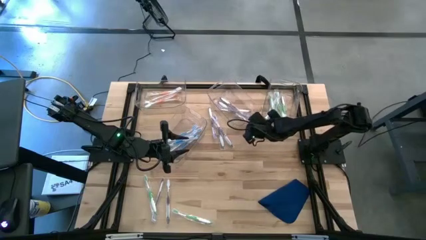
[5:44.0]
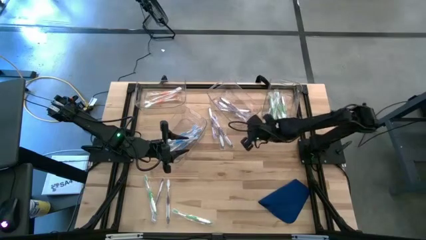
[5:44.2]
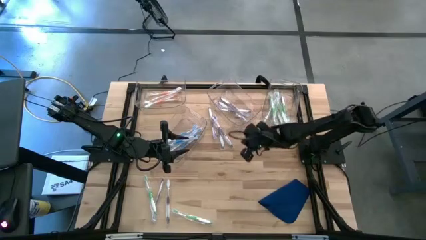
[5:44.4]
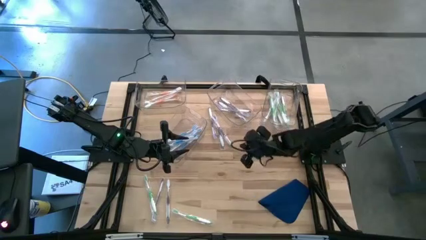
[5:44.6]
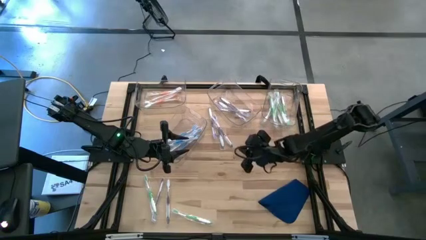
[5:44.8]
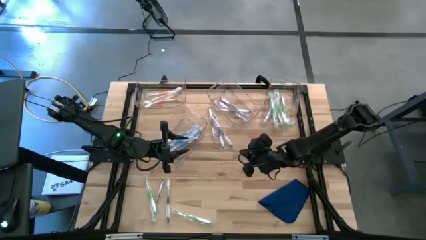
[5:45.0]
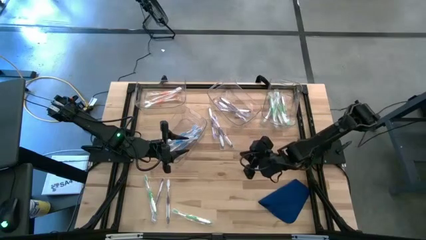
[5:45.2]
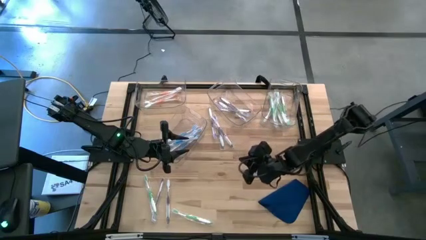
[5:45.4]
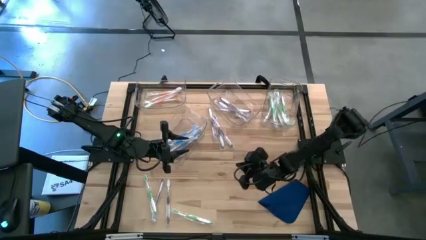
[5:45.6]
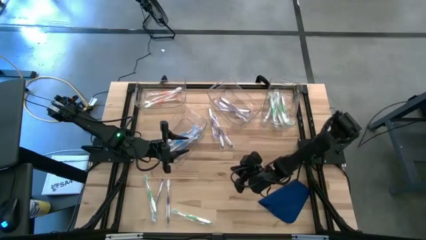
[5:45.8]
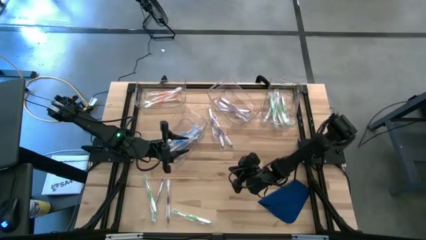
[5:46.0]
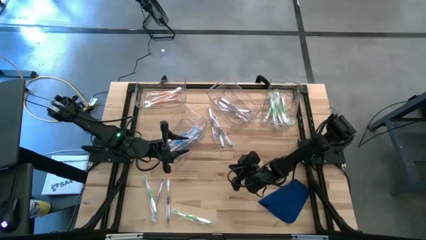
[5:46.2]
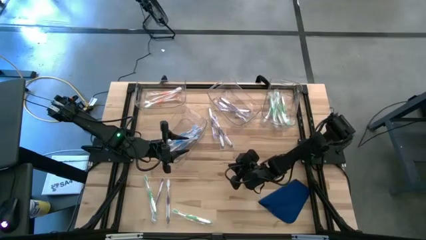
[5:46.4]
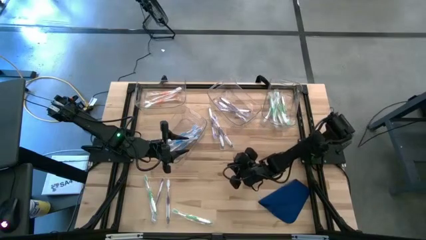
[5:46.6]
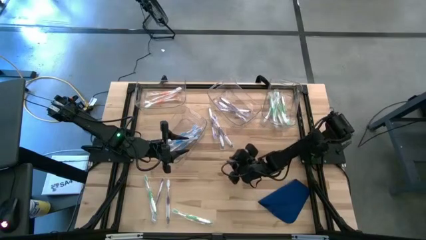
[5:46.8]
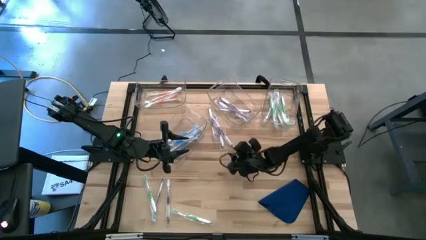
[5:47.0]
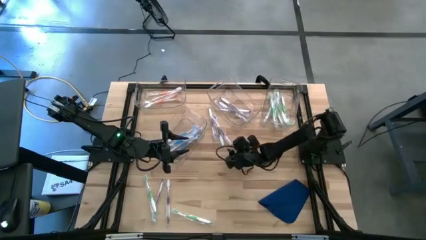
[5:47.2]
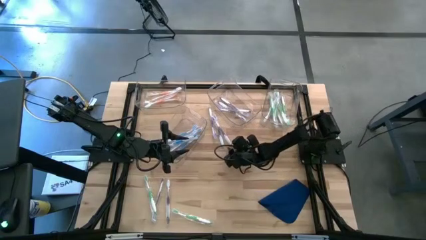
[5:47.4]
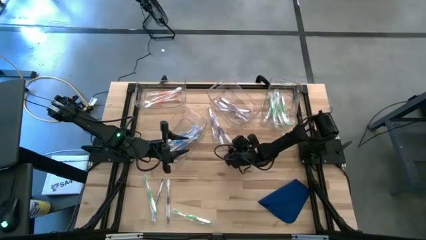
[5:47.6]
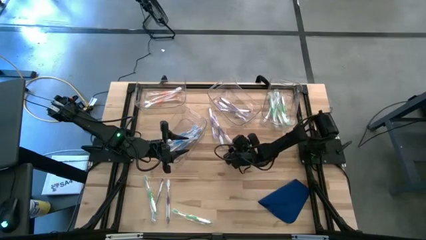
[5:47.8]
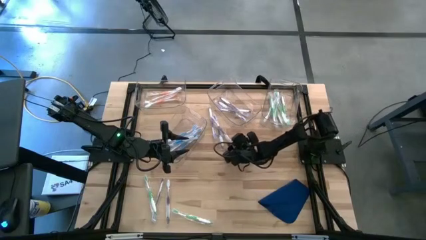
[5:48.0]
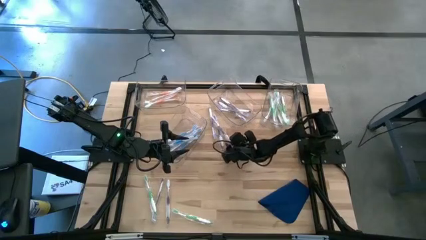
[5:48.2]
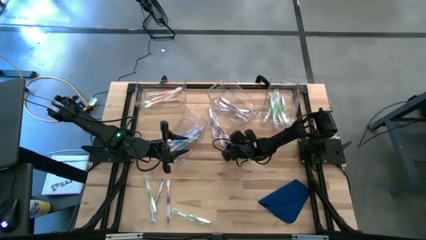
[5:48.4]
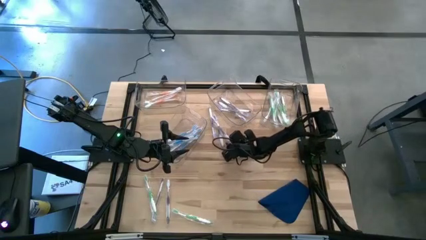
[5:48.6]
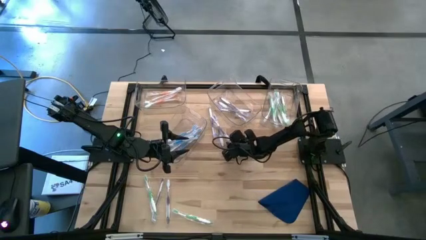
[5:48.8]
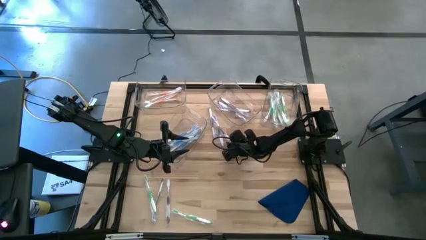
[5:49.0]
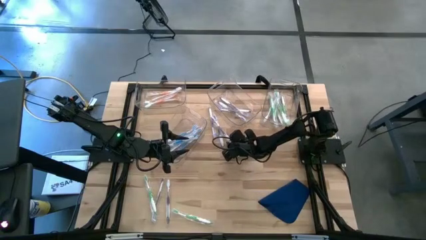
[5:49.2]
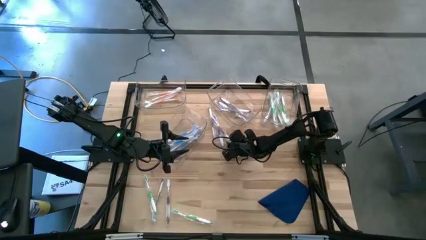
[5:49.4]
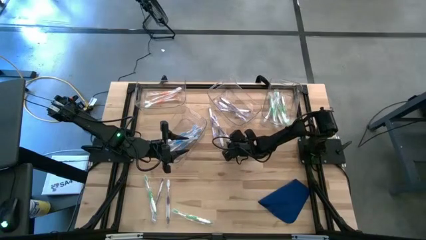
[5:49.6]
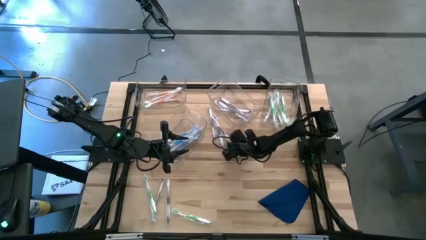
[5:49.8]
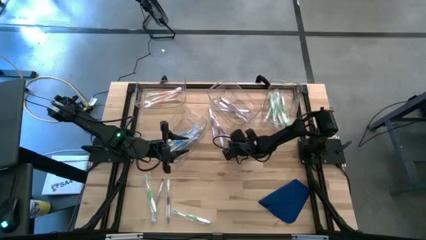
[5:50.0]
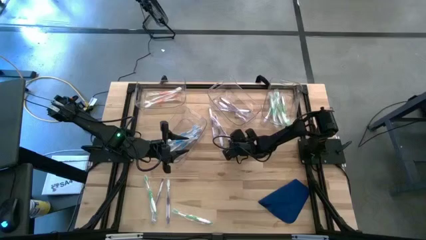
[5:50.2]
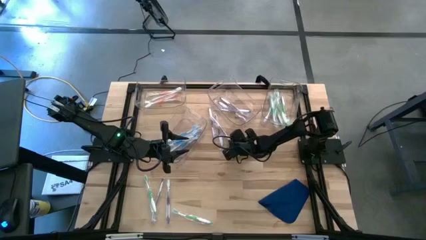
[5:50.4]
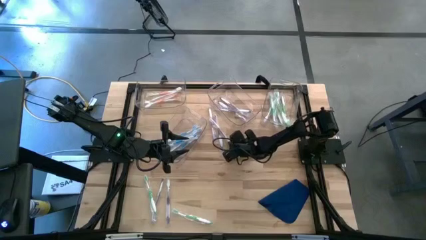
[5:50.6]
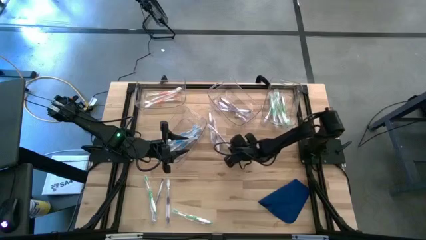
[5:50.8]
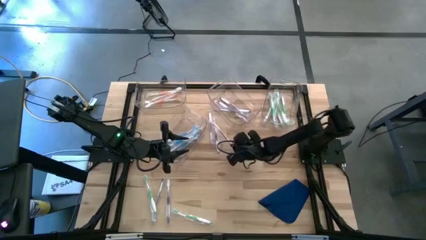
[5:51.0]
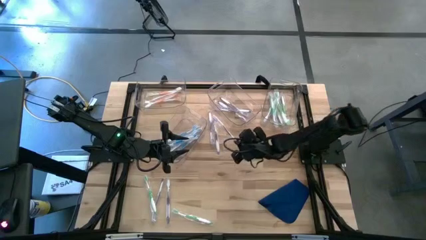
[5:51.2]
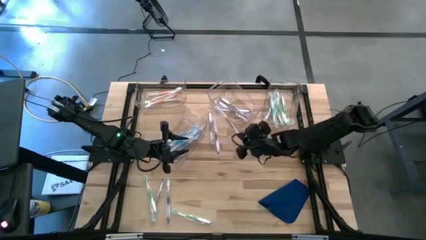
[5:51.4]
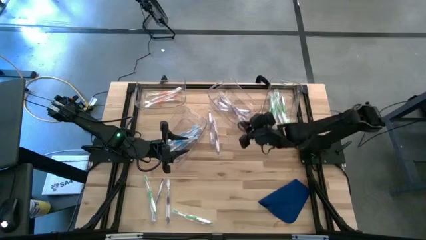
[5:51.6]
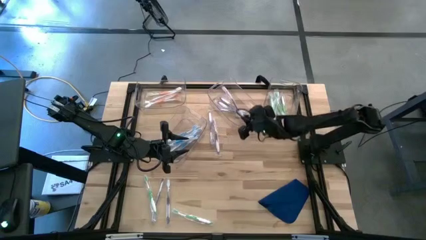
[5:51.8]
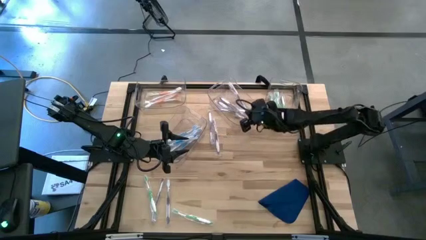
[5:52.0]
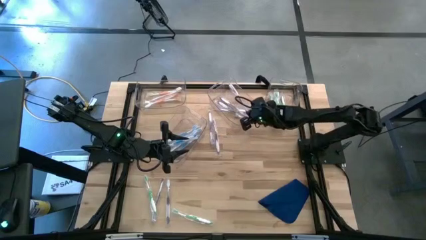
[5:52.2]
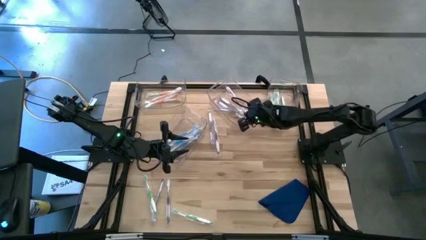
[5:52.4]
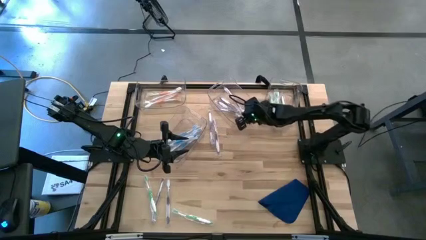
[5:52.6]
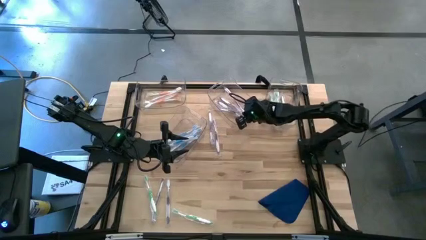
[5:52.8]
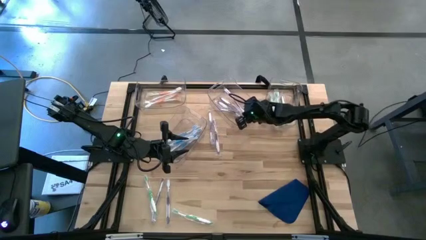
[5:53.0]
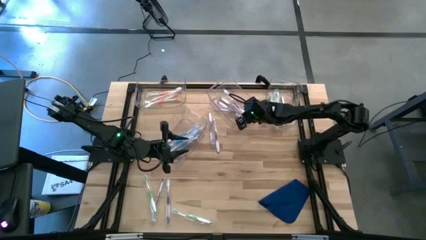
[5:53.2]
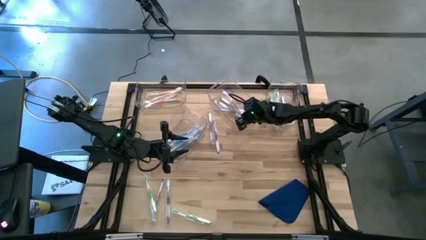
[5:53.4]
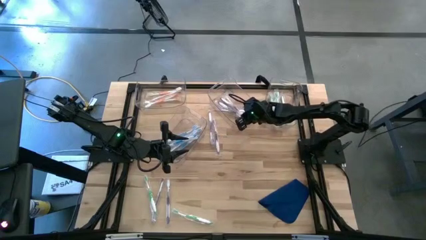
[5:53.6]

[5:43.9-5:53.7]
Task: Pick & Place Toothbrushes
Put the purple toothbrush into the top center transparent bin
